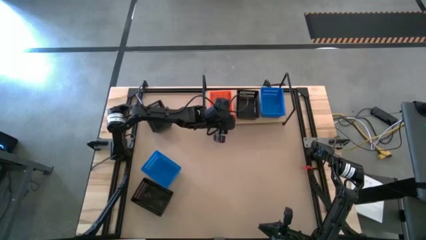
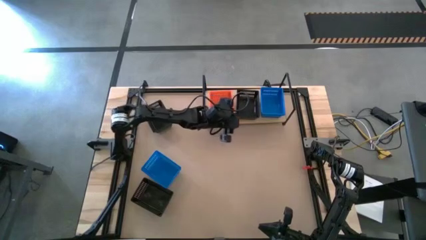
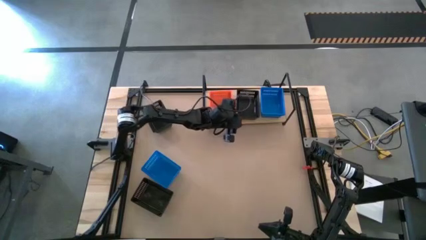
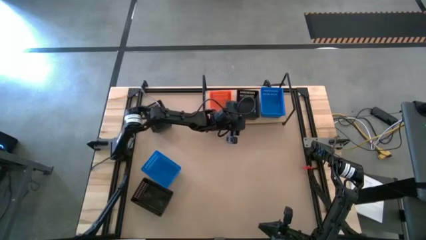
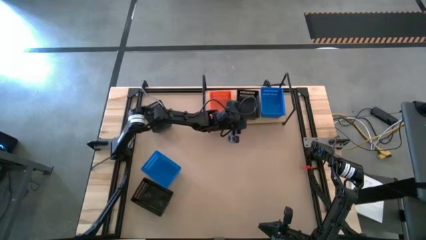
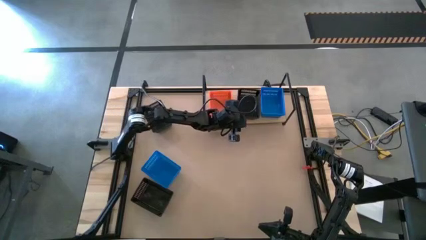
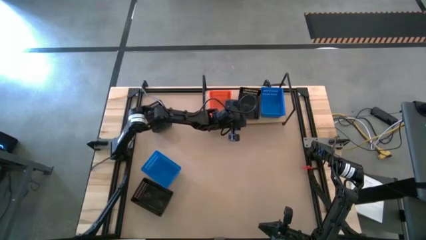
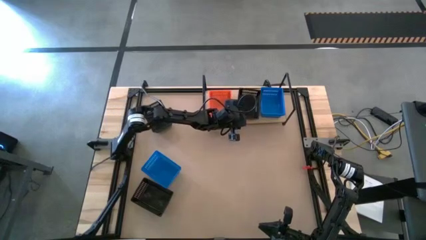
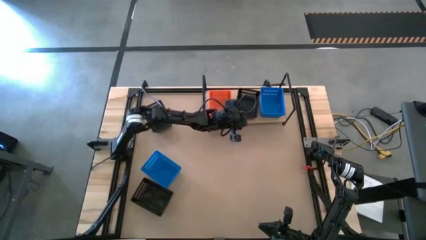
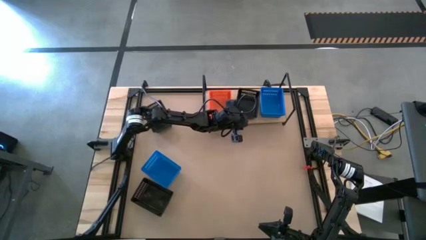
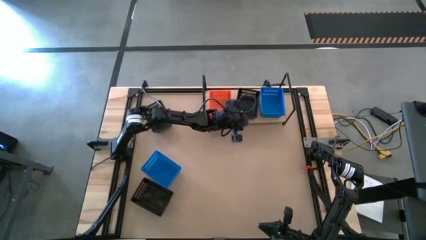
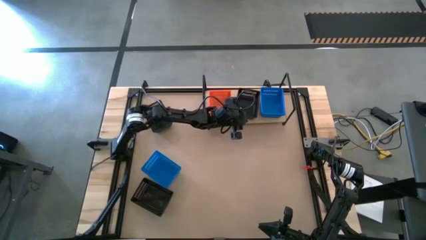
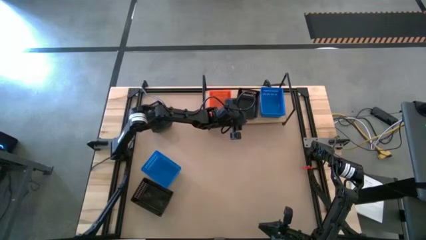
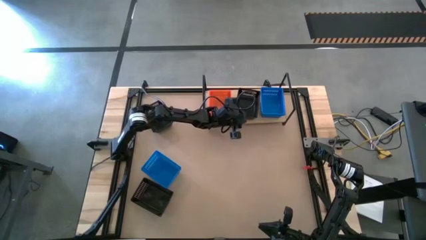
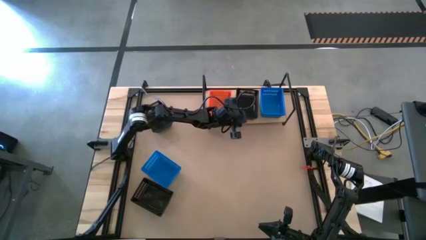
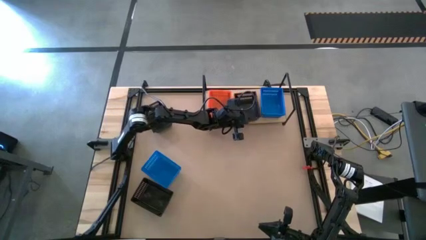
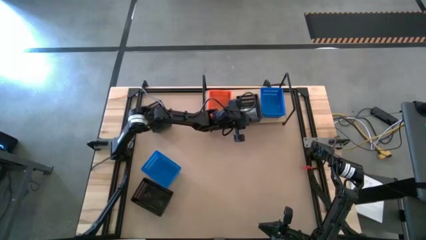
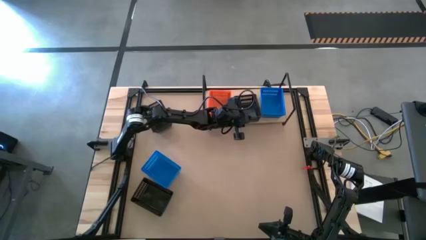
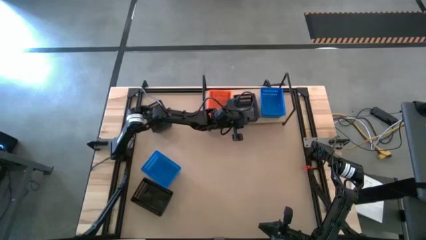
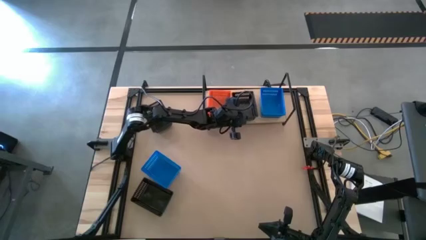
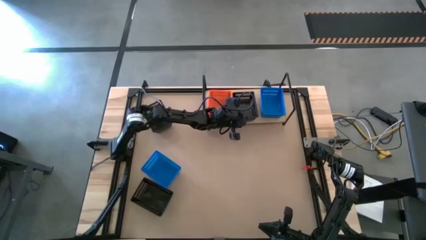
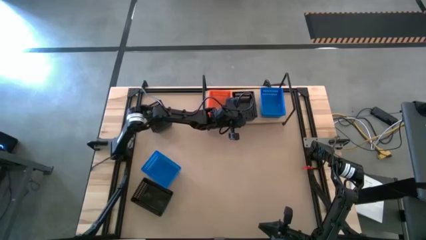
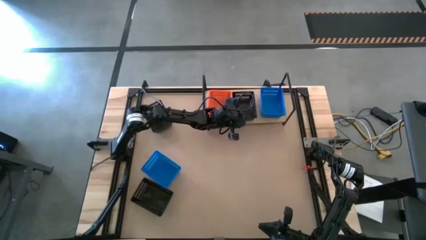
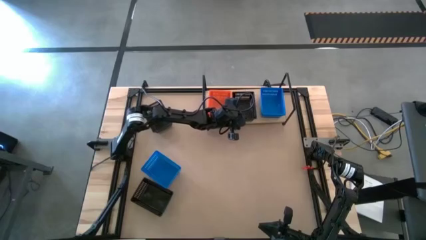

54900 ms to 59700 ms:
Task: Stack baskets on shelf by color
Adjust the black basket on the shelf

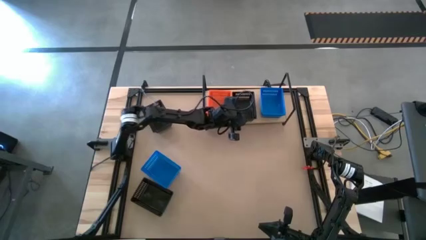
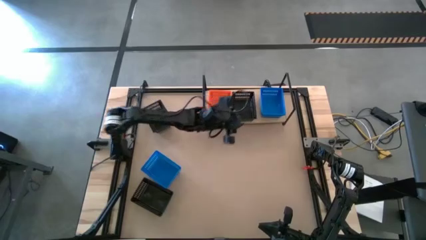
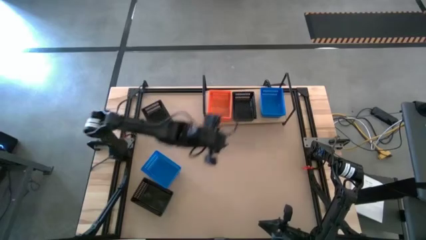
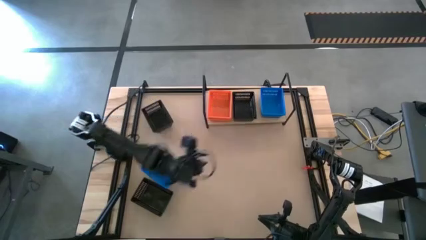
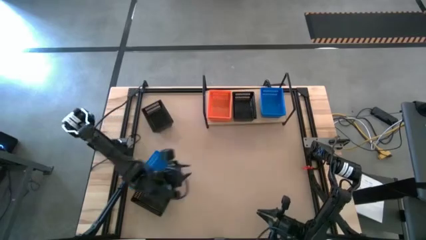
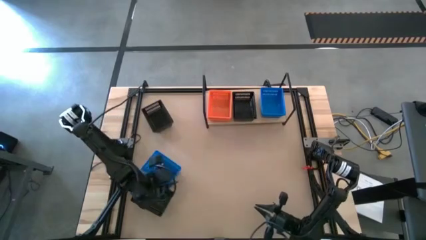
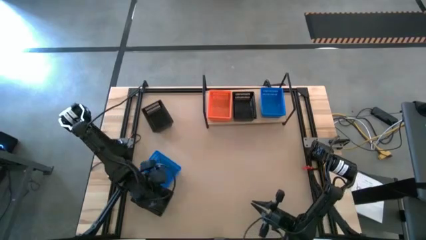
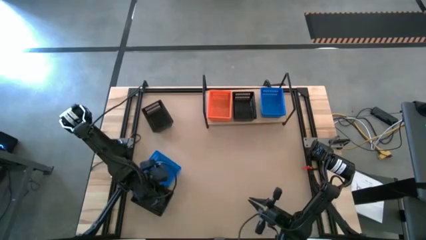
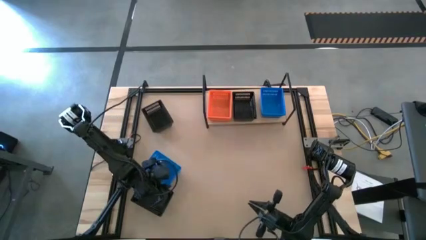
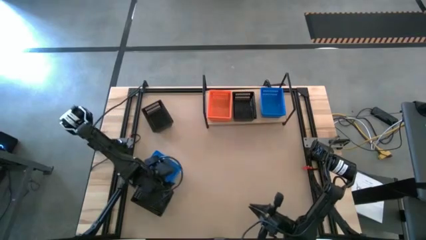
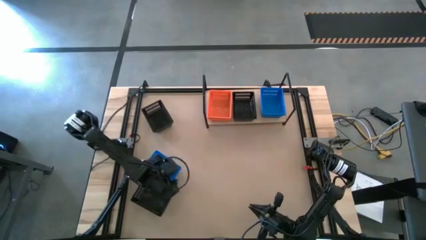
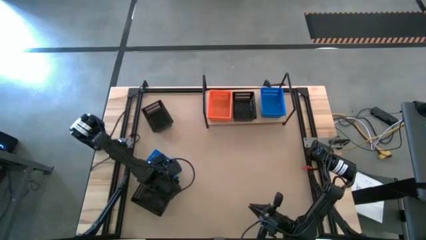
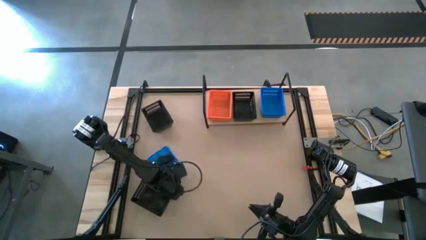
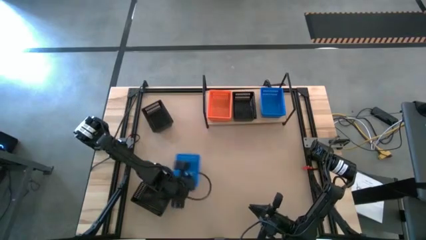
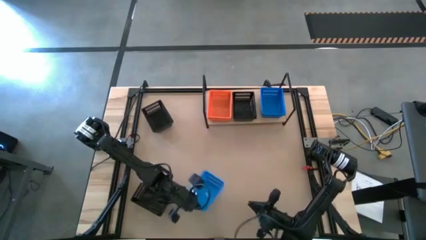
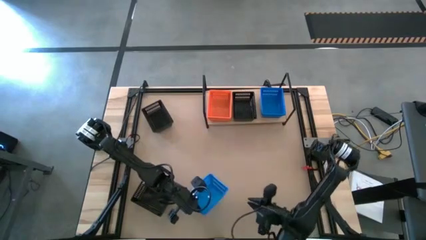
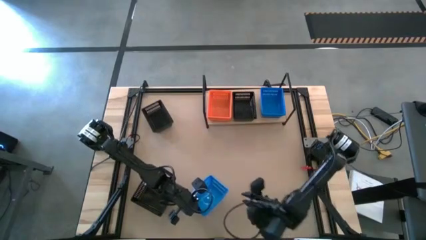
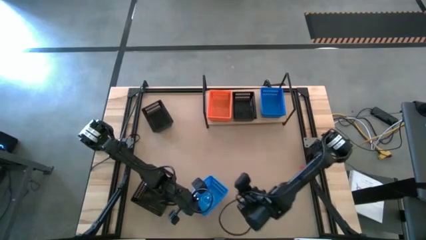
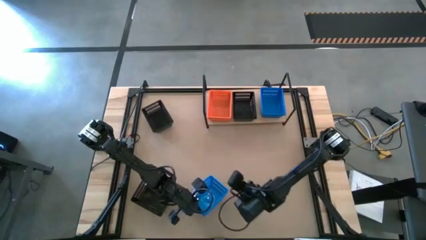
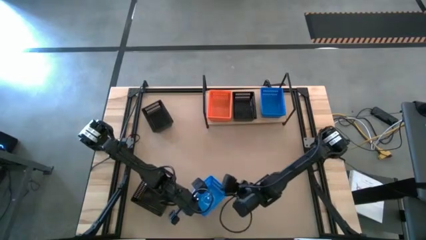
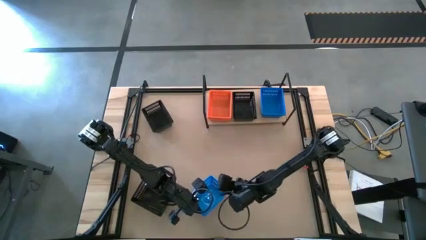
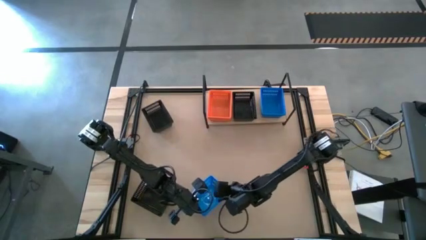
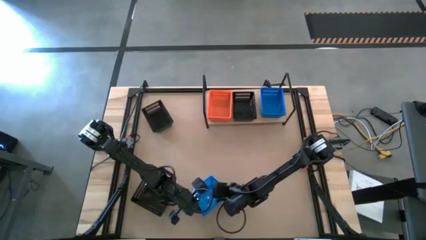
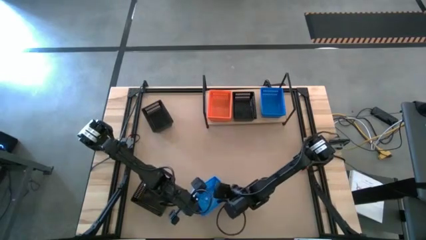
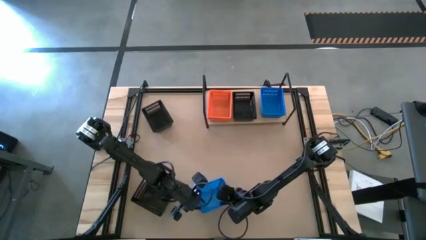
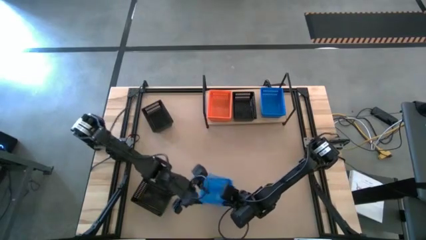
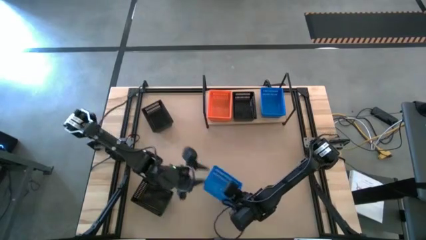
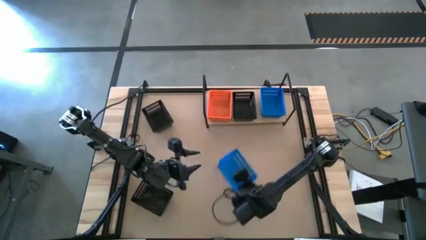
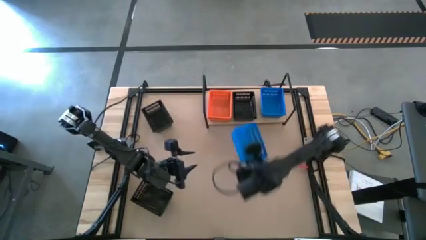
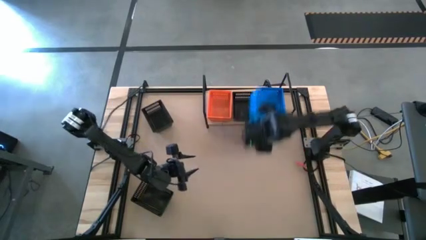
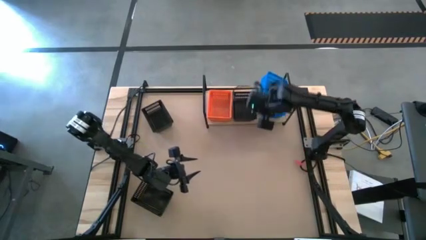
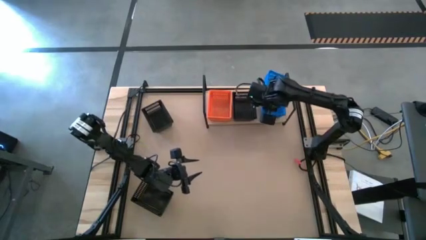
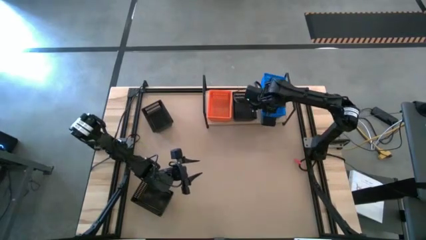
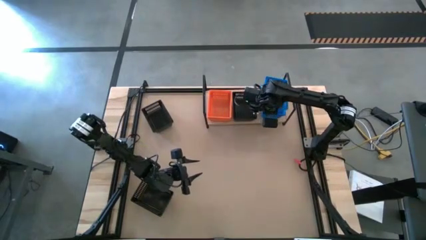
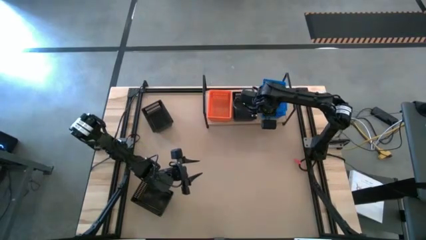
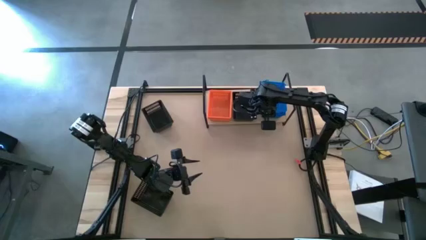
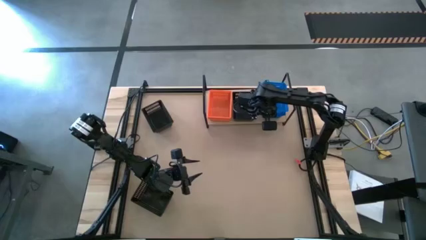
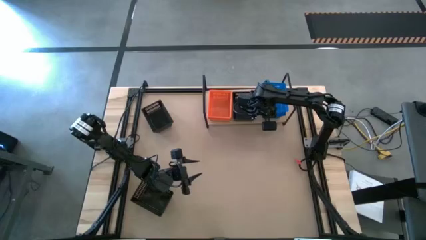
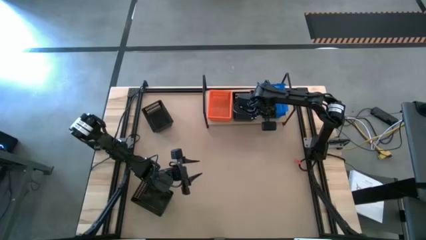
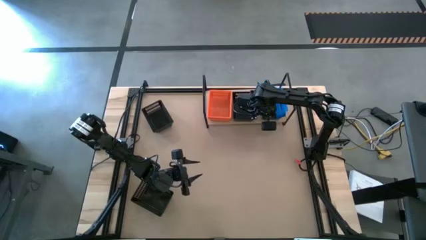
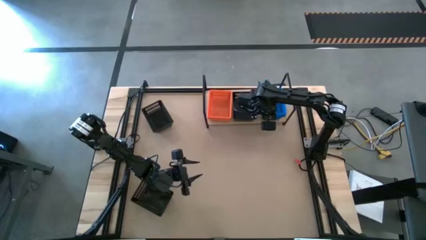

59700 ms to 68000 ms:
Stack the blue basket in the other blue baskets on the shelf

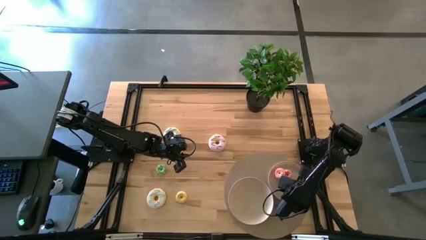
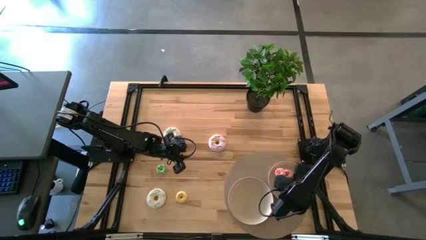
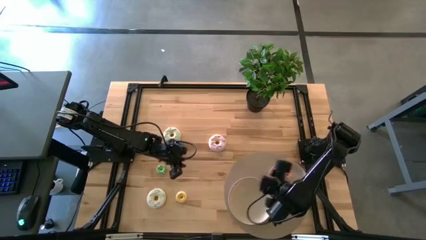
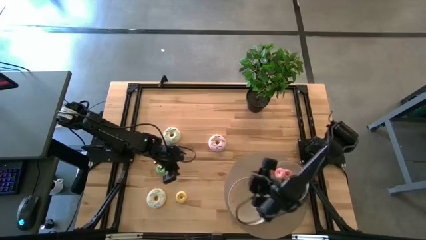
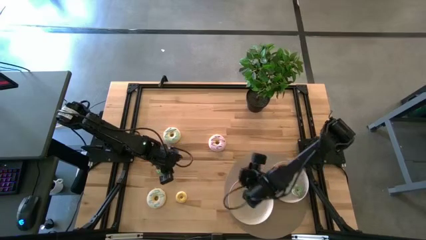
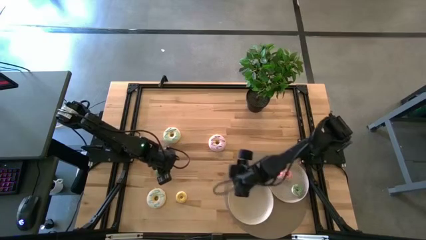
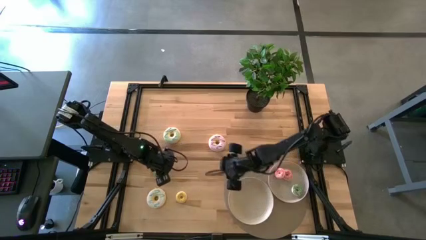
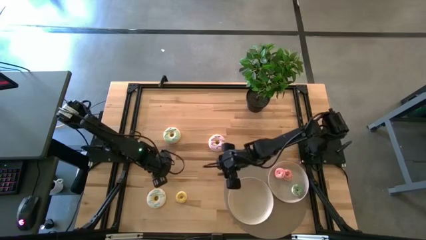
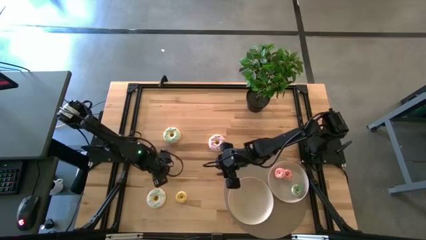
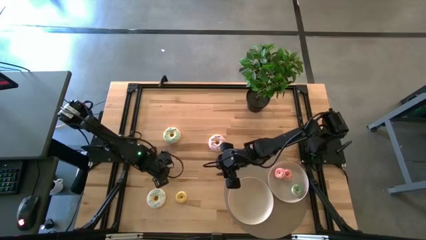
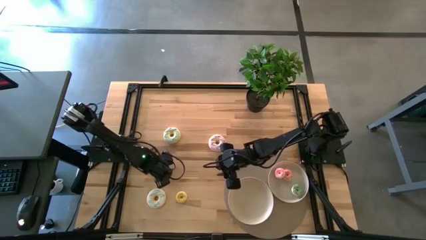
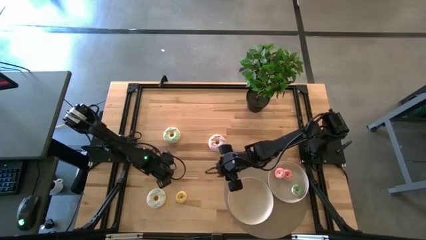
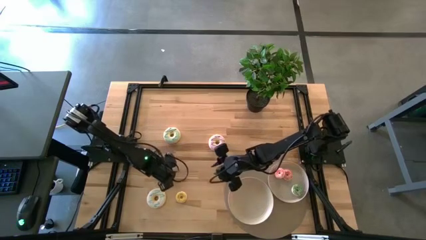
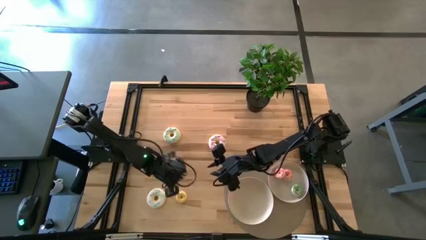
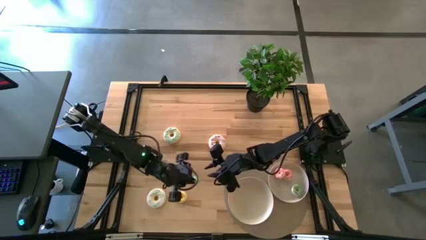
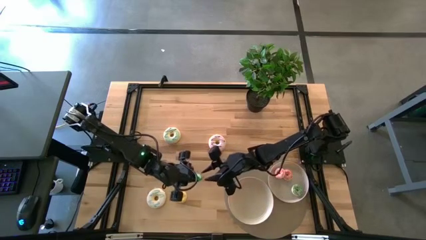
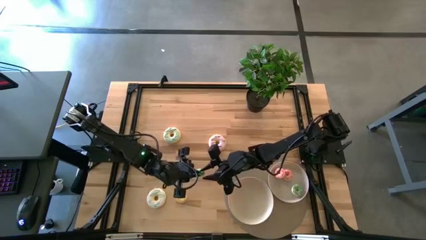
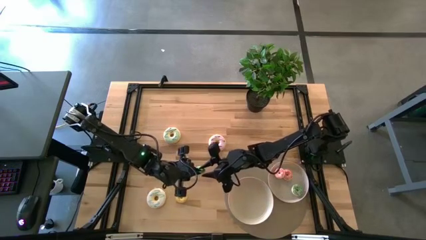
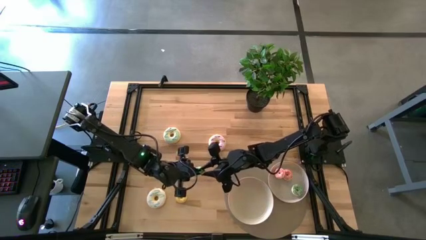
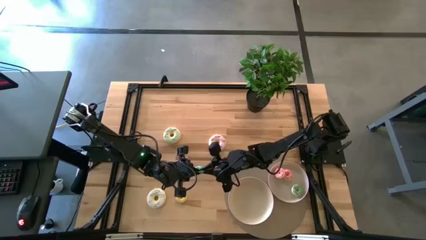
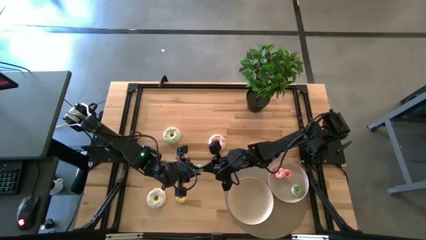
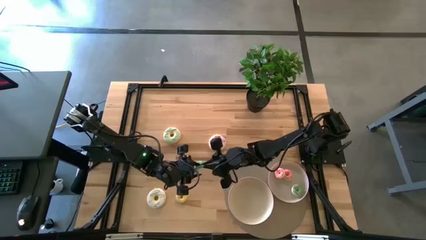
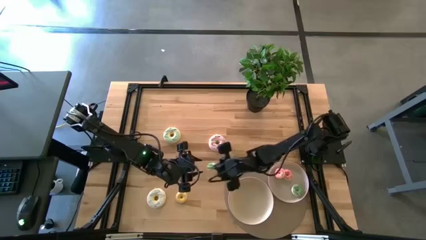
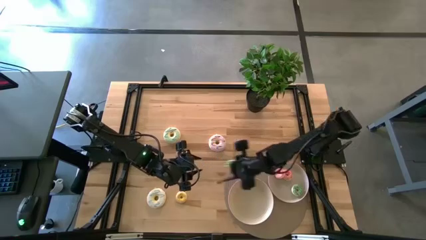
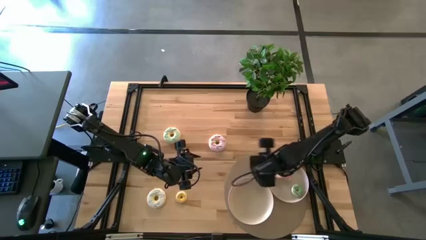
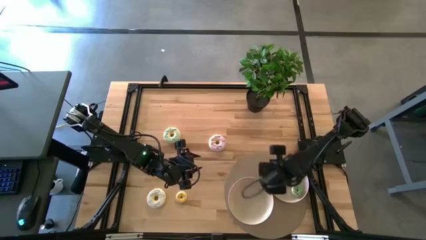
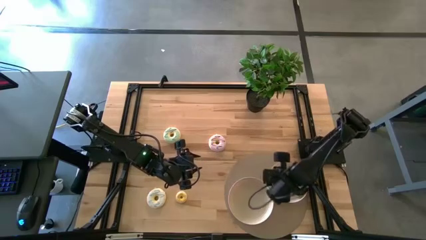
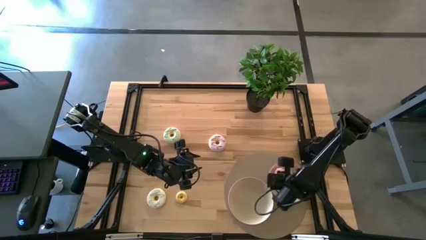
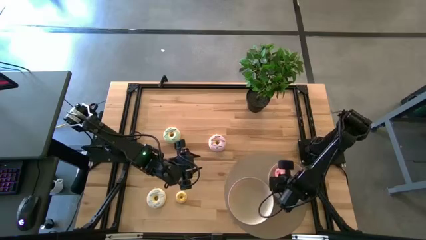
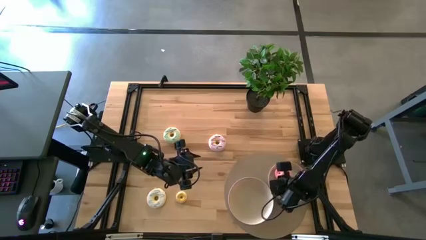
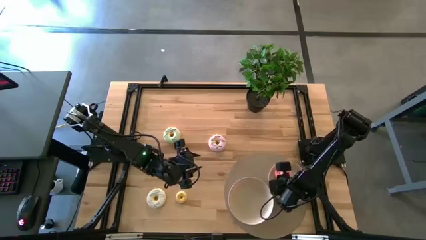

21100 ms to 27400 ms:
Task: Pick & Place donuts
Put the small green donut into the right white plate
